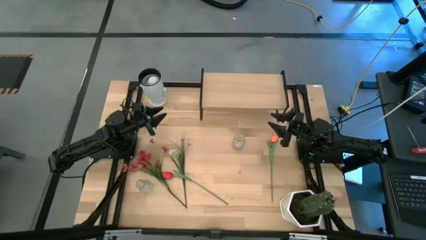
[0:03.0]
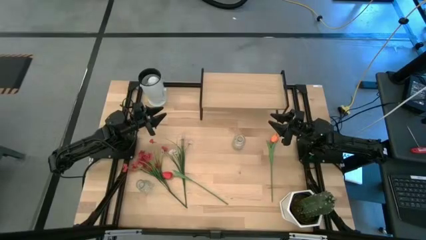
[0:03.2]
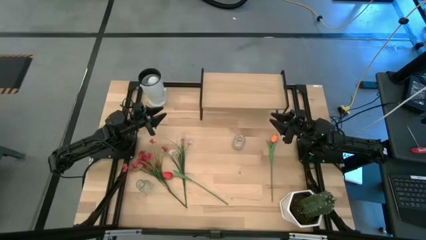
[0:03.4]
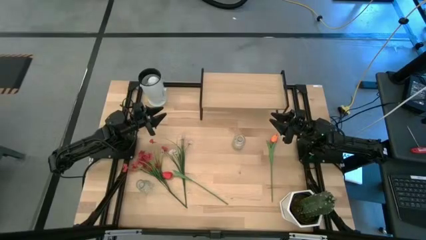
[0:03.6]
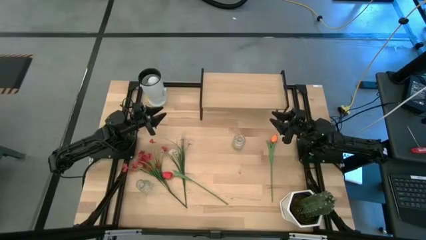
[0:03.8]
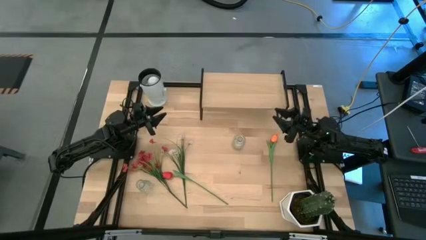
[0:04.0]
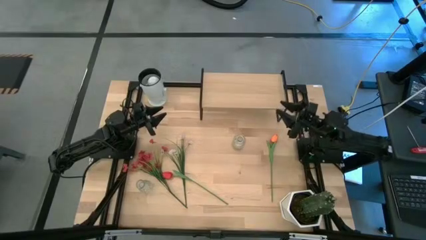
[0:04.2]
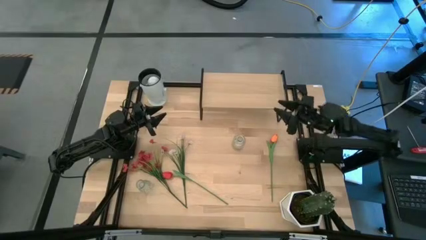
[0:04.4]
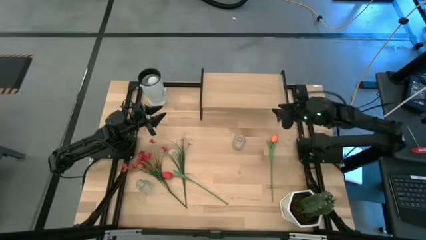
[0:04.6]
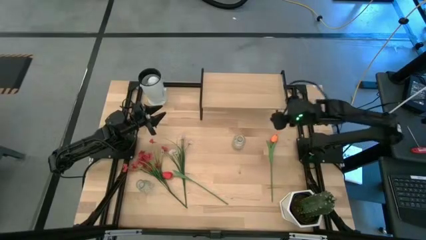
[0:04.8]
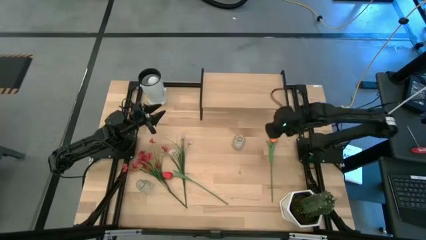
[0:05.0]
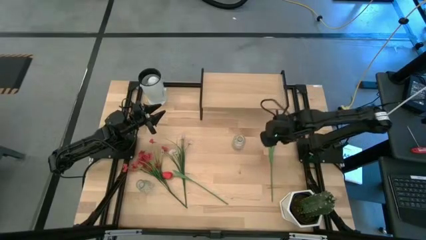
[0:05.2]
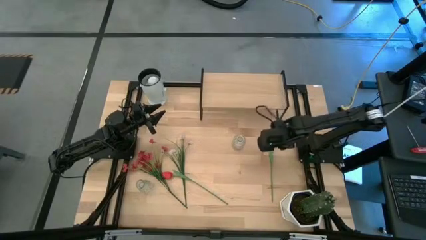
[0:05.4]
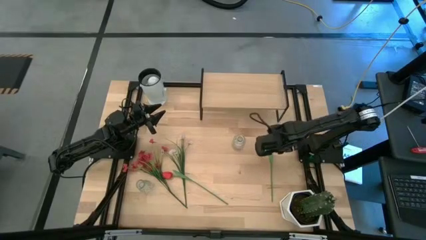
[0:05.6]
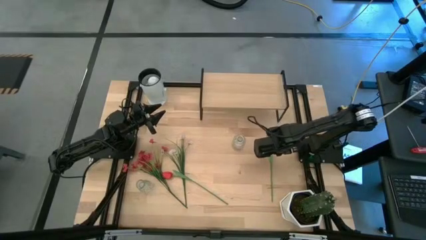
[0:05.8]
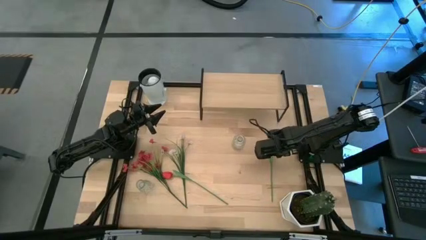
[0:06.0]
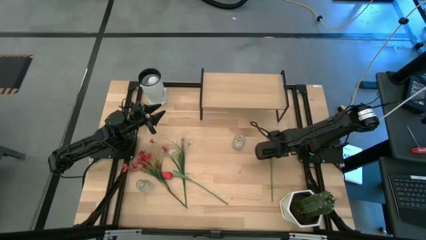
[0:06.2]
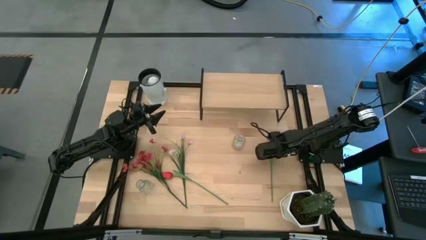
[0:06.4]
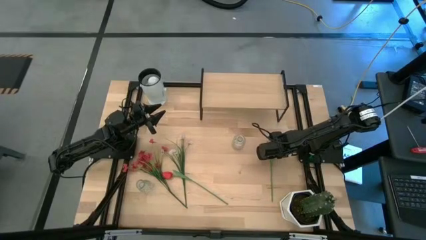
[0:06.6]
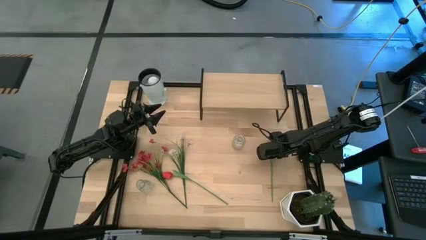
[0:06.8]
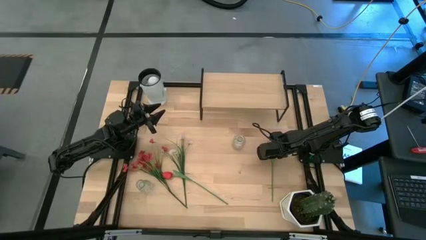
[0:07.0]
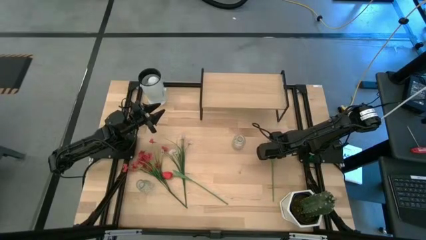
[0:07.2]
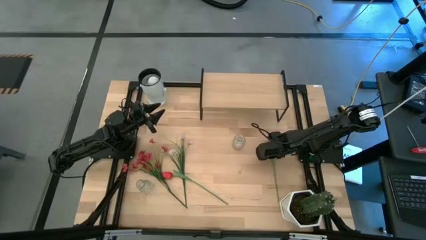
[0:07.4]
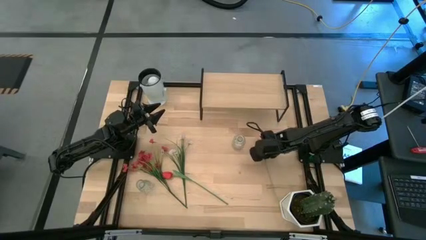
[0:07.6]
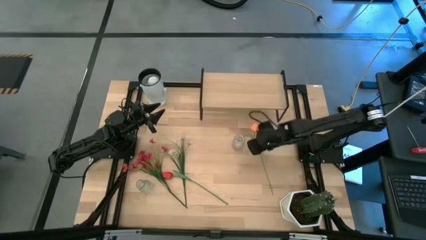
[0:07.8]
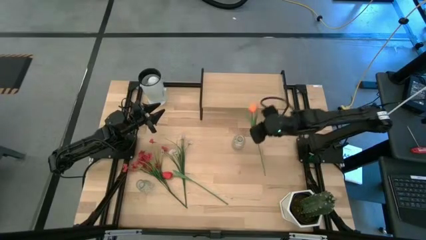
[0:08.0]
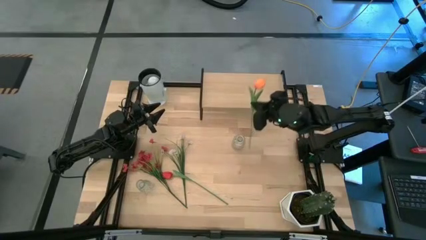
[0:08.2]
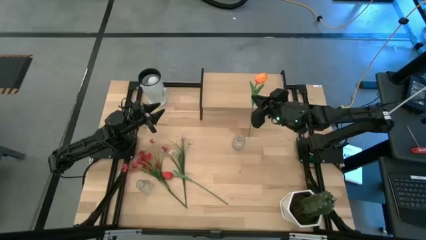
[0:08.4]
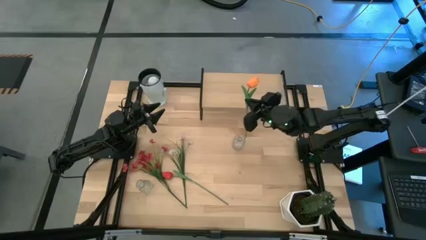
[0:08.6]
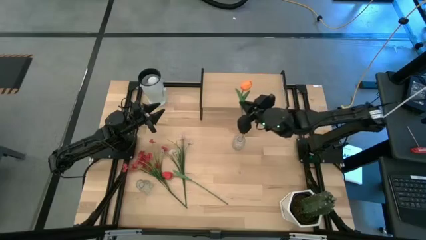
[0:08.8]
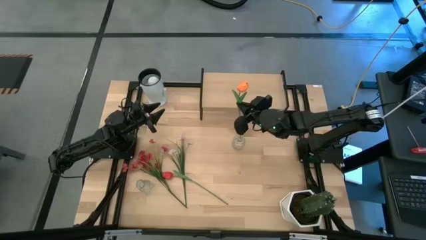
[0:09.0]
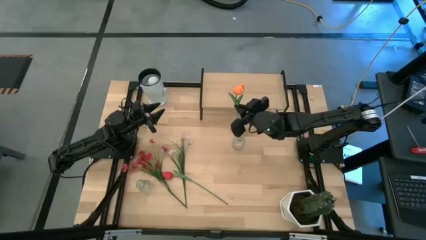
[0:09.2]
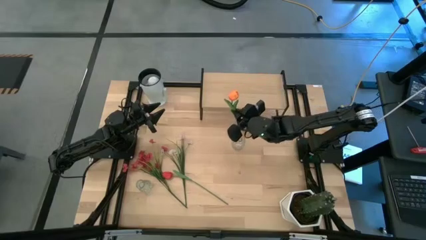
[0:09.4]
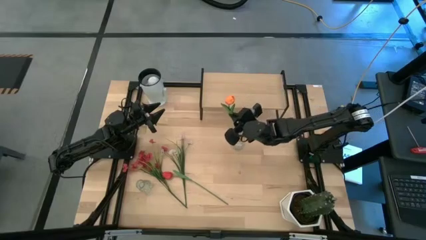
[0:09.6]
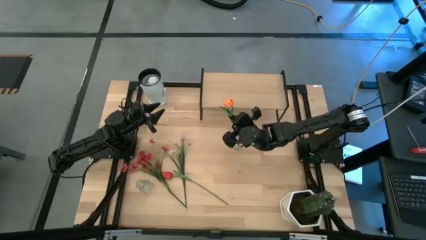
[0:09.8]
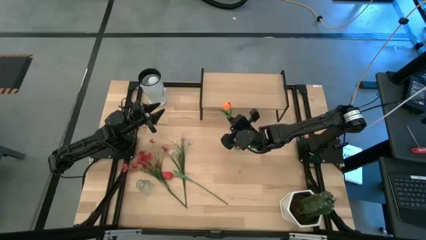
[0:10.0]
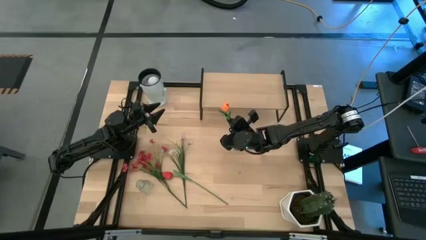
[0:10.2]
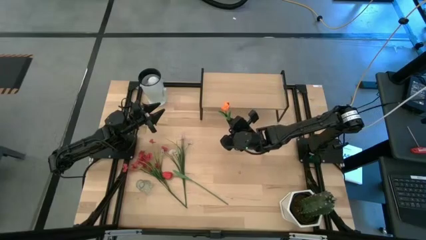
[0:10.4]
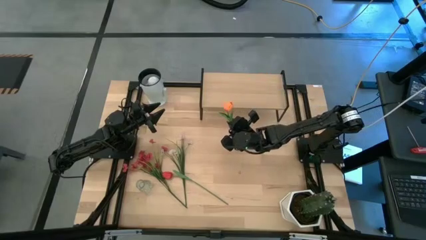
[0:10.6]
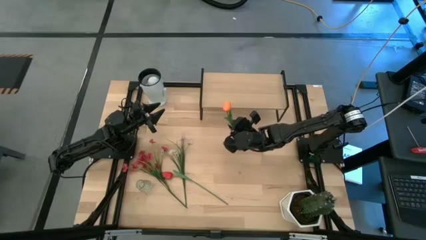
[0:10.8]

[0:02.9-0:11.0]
Task: Pick and place flowers into a vace then onto a shelf
Put the orange flower into the right transparent vase

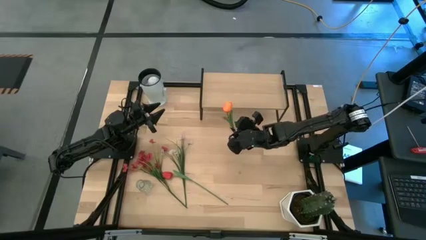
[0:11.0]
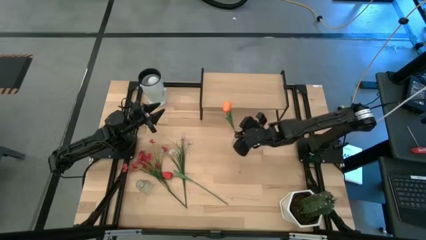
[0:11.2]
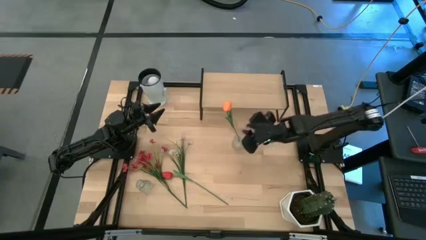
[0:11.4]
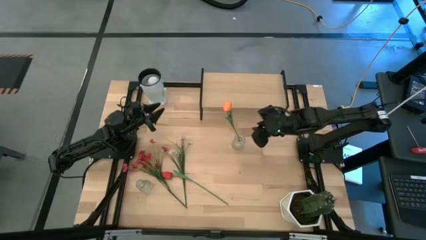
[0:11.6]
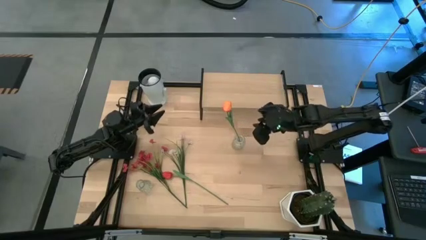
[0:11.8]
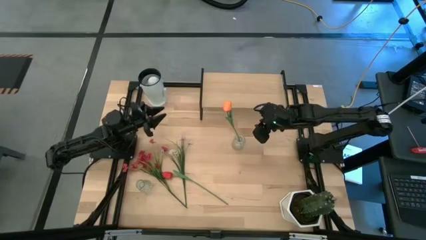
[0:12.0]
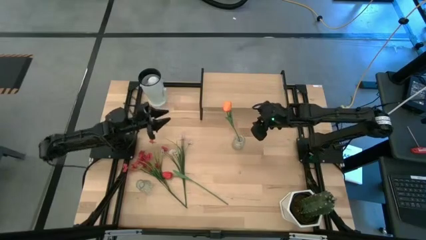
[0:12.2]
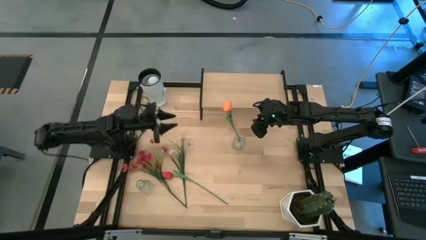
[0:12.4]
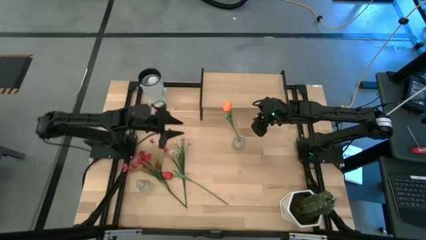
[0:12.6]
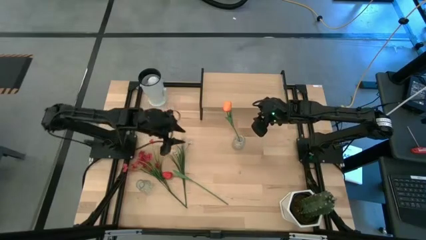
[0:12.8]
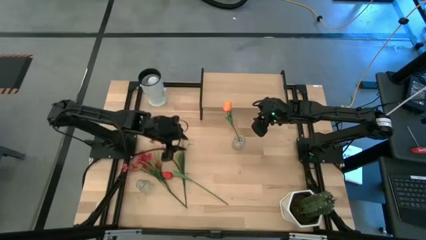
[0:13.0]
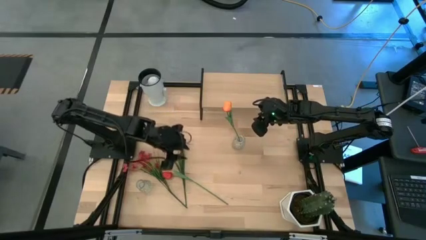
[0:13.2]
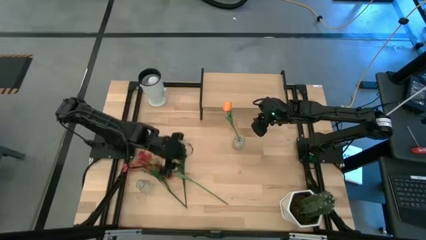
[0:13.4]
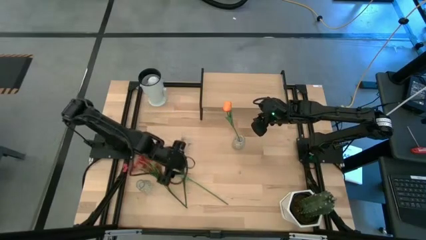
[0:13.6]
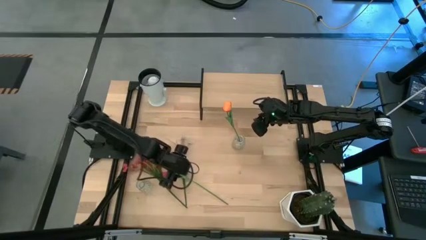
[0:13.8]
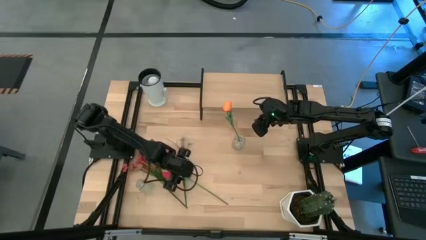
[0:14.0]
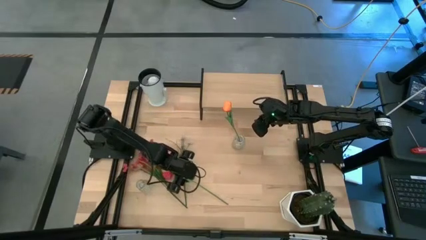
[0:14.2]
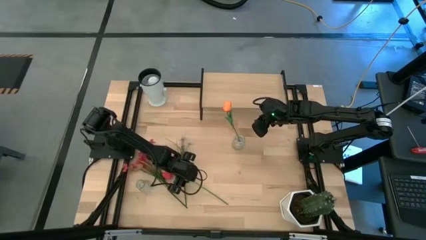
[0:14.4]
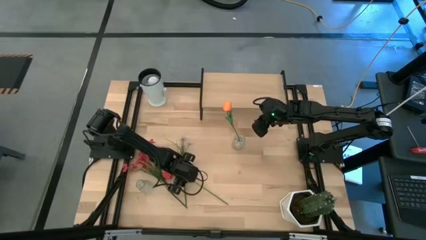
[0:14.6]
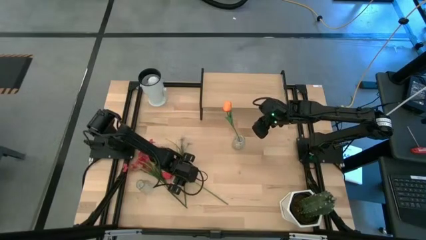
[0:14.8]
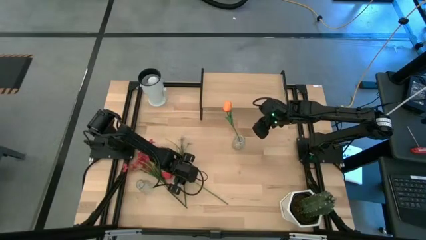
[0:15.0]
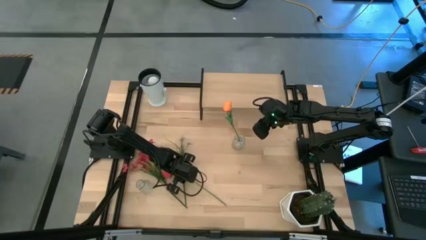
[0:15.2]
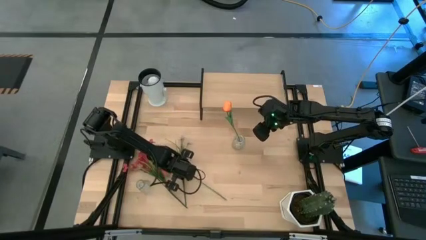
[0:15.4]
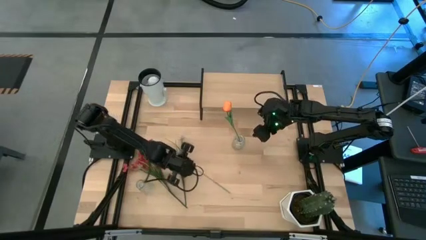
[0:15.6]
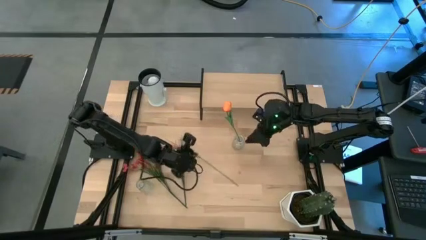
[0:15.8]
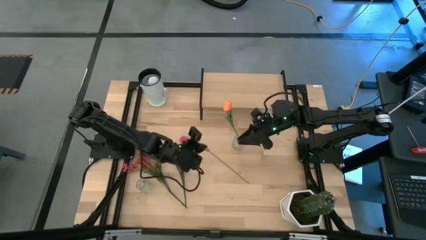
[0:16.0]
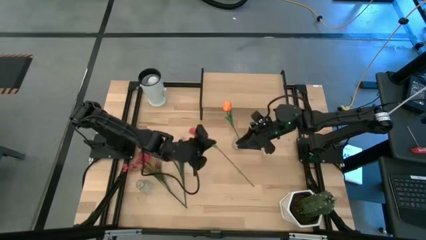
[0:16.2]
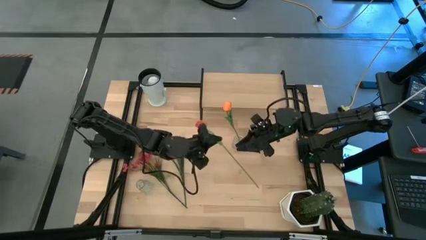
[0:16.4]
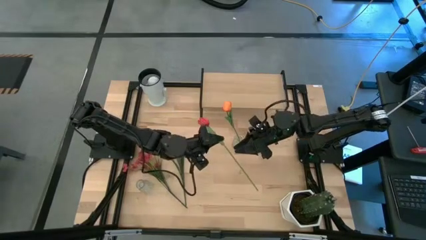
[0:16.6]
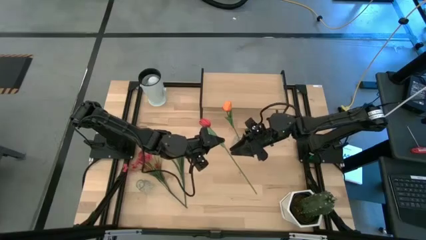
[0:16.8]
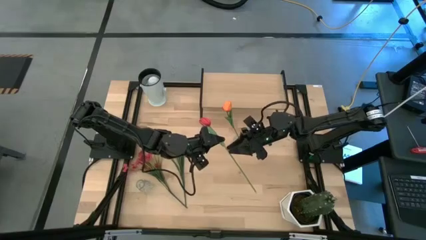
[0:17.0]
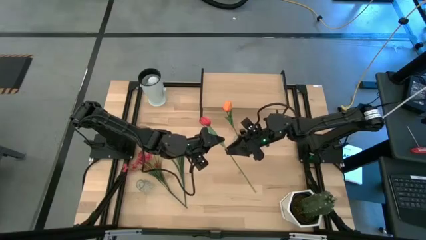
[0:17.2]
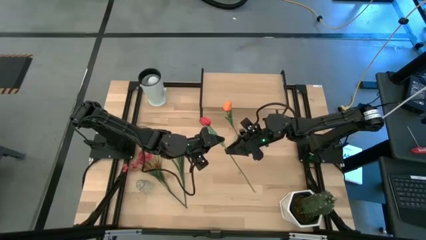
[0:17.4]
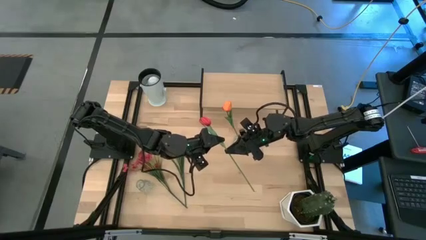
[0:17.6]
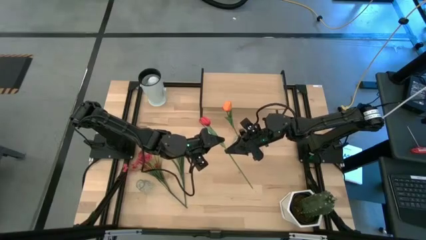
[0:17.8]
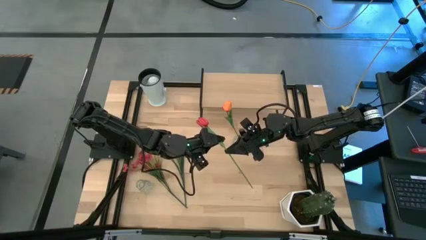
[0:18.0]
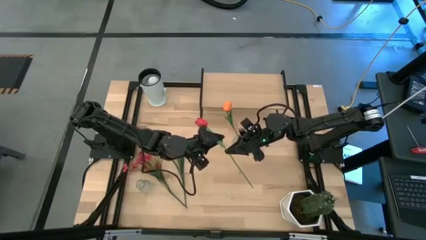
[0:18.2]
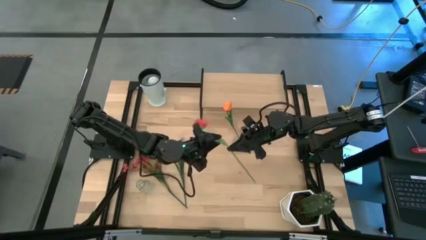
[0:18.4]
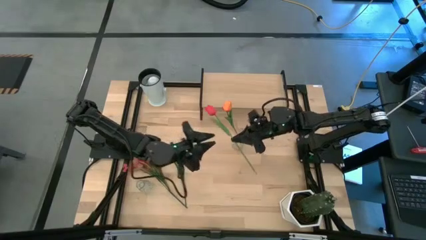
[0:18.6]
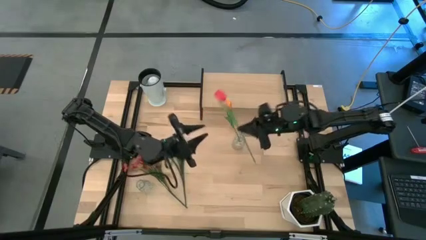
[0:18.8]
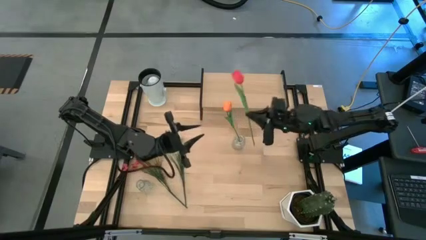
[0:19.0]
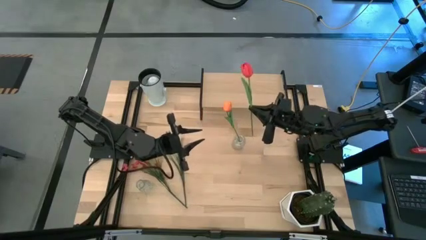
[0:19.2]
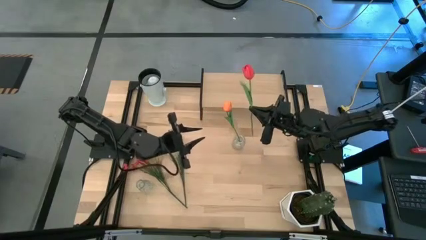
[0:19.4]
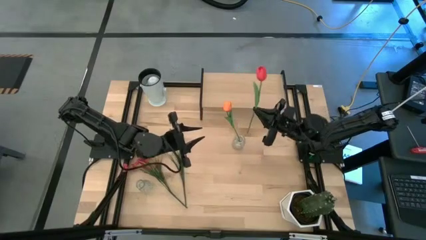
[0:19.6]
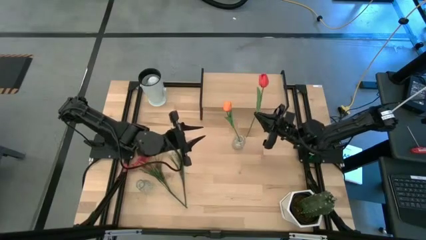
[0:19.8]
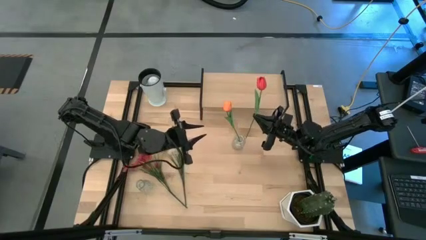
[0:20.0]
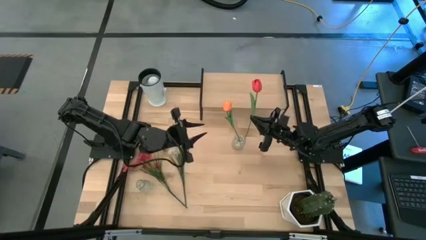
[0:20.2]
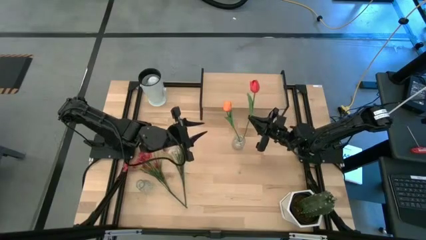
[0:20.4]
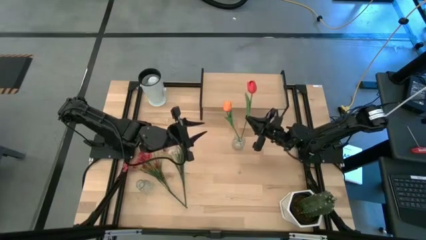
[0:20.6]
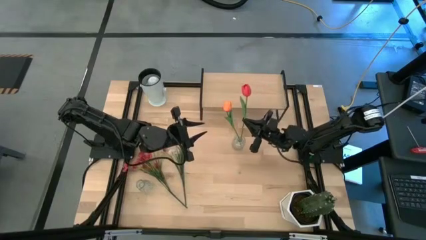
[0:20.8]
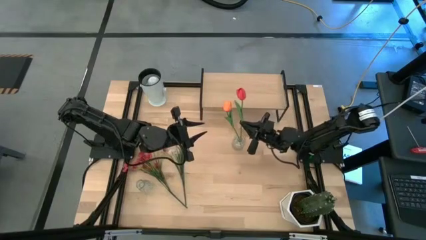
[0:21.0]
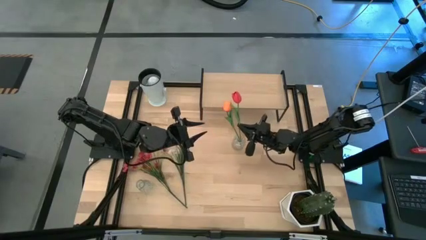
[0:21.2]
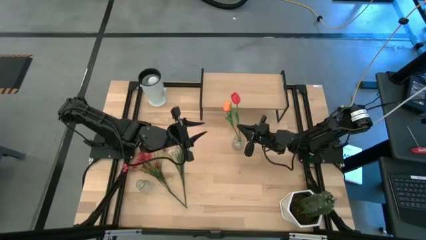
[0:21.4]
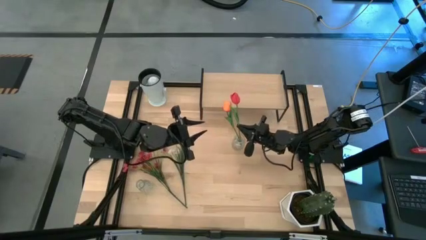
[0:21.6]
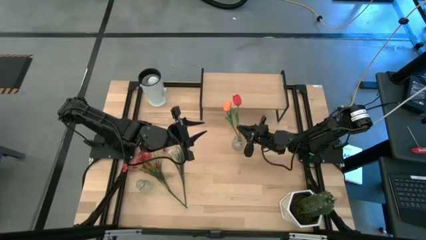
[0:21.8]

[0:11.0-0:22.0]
Put the red flower into the right transparent vase
